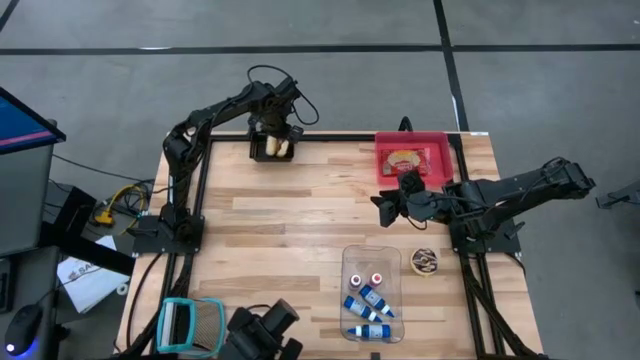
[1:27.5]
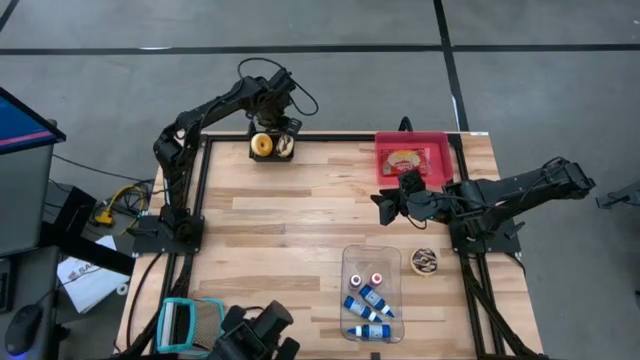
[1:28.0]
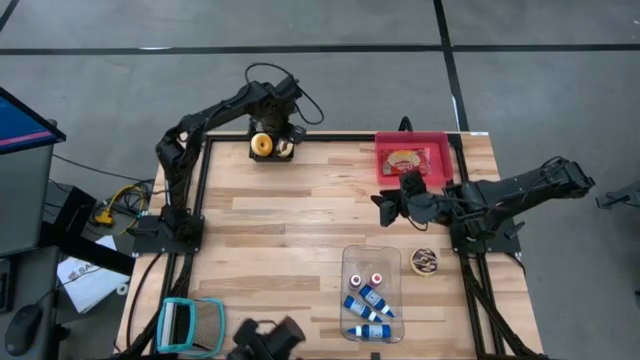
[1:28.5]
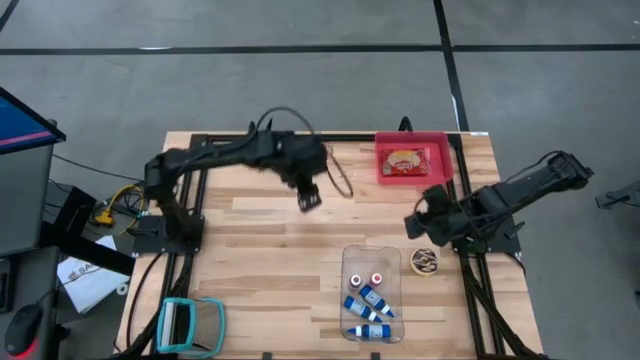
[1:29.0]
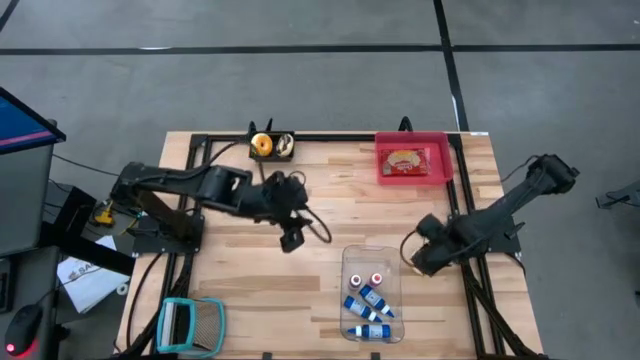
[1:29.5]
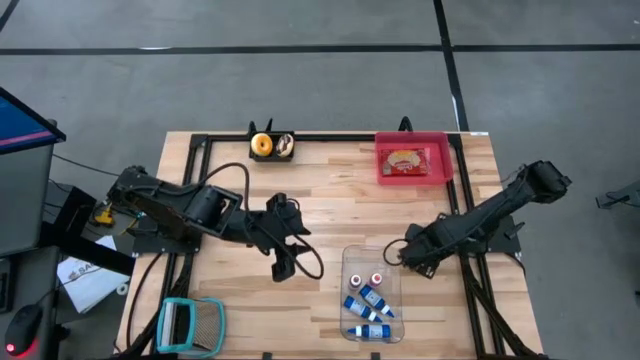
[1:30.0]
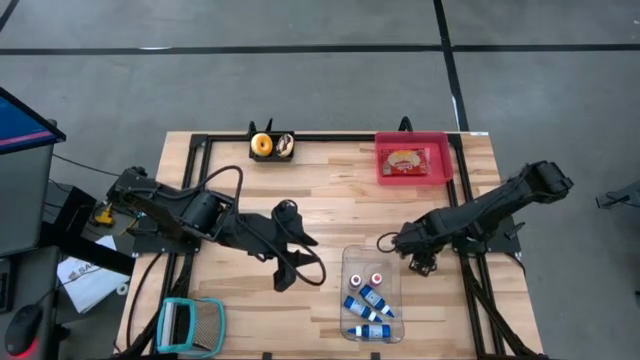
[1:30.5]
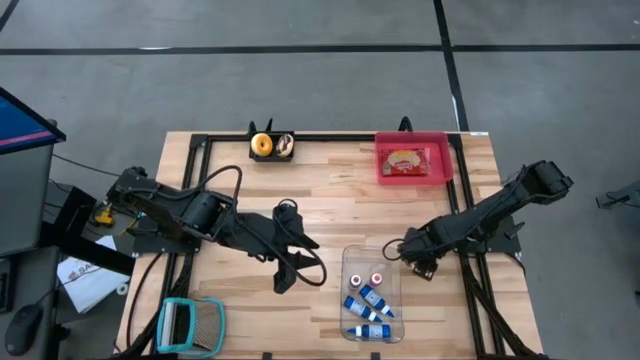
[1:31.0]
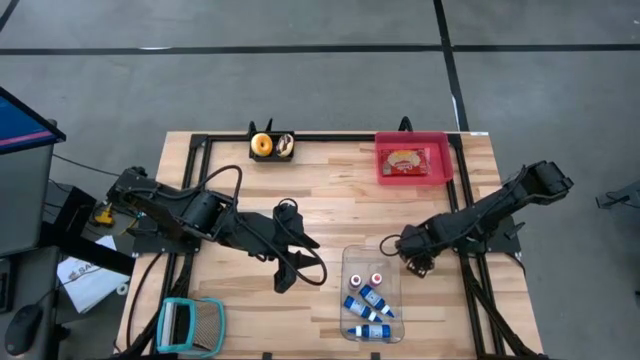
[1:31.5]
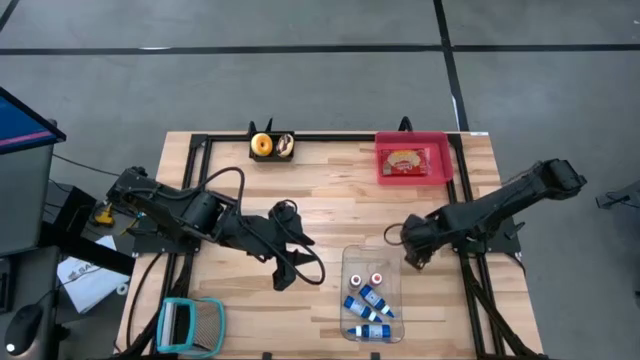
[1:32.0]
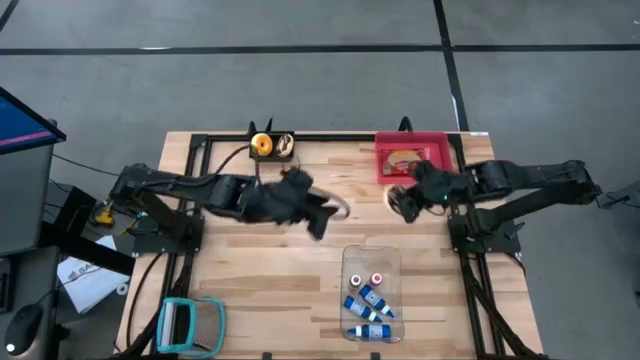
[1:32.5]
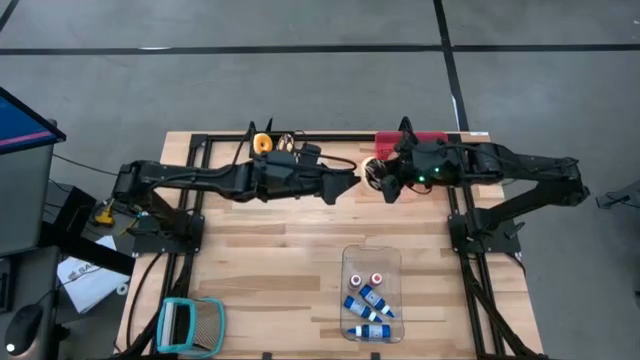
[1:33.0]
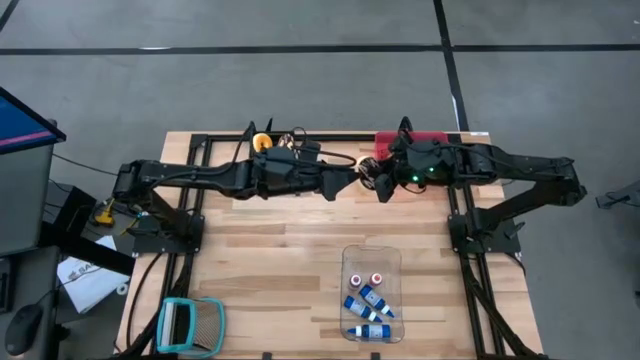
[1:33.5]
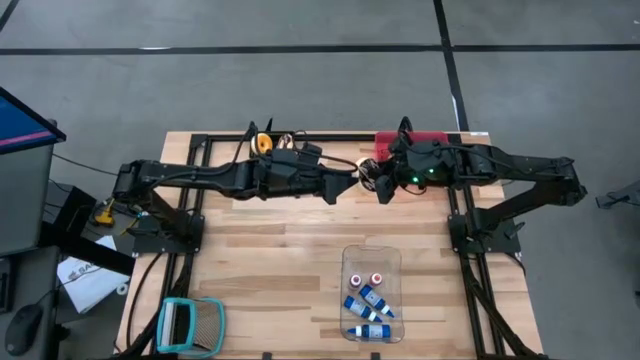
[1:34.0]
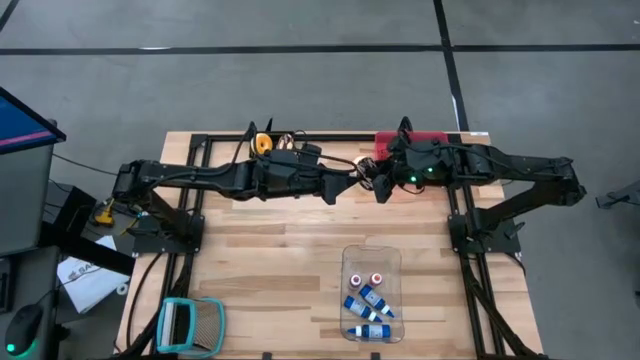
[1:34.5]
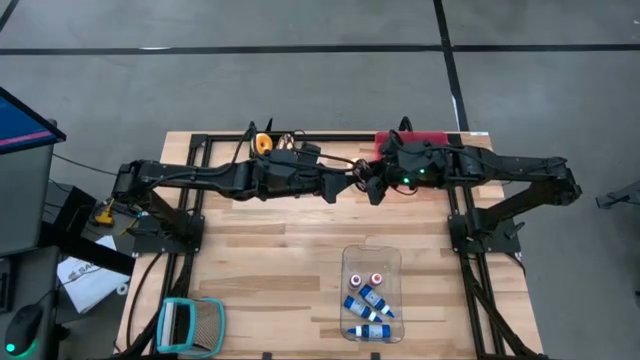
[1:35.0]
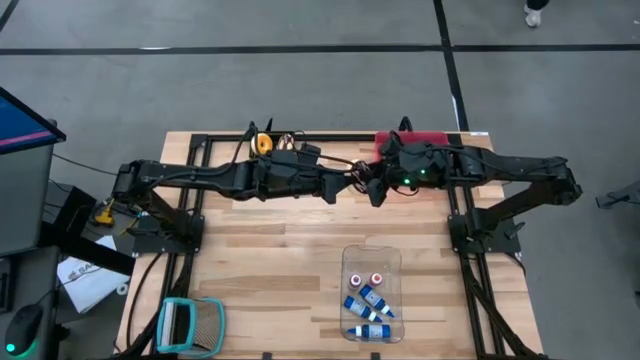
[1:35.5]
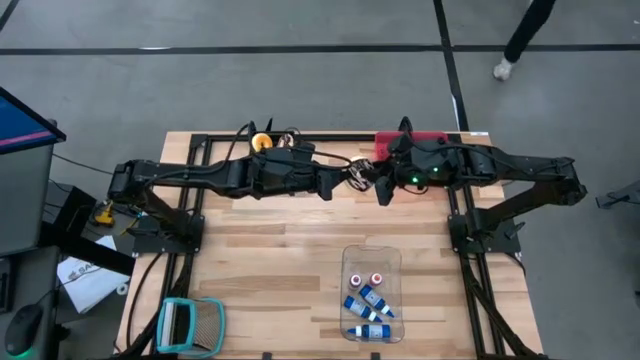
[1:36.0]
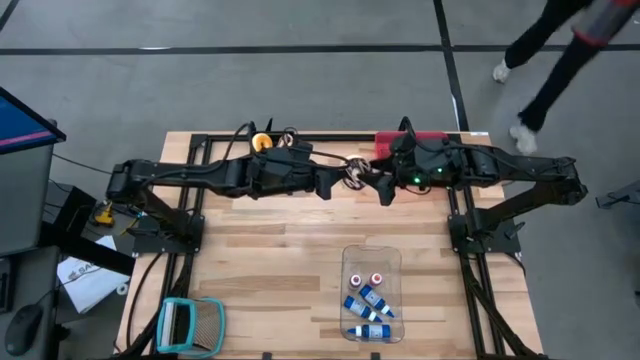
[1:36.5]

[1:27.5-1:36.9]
Put the black donut into the black bin

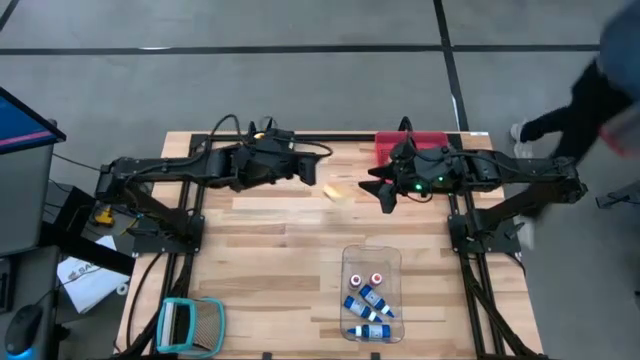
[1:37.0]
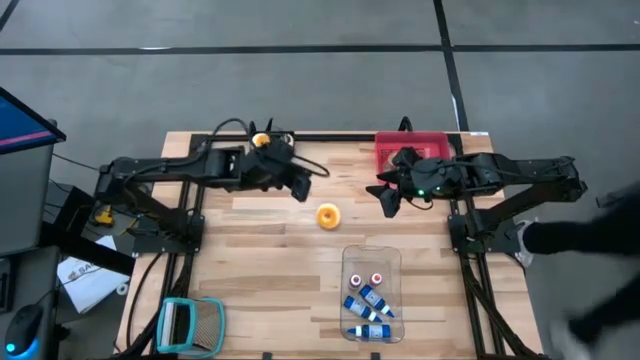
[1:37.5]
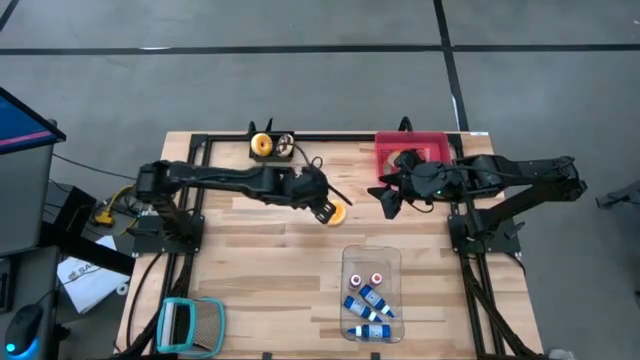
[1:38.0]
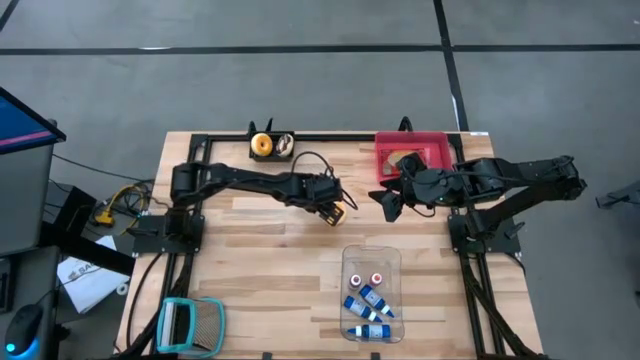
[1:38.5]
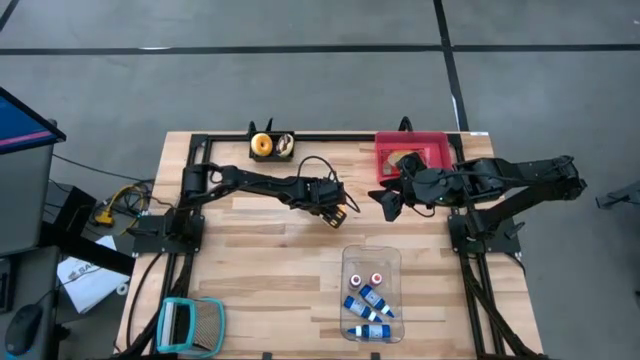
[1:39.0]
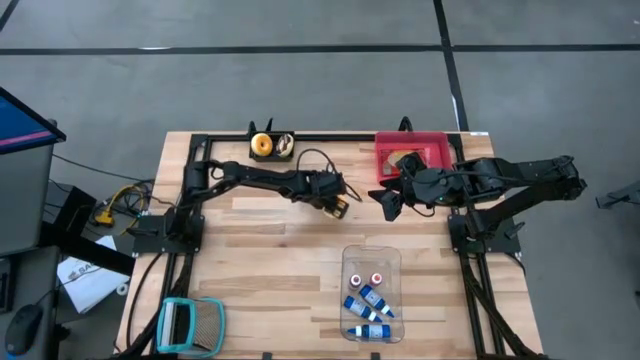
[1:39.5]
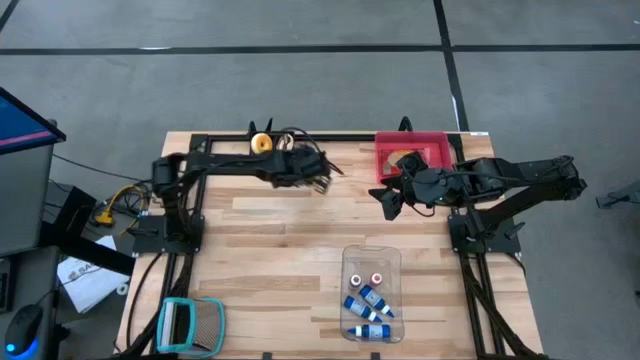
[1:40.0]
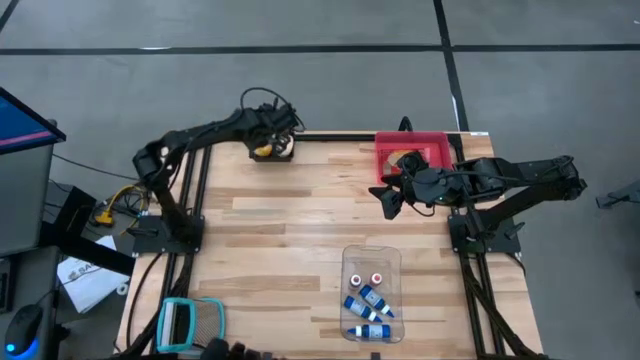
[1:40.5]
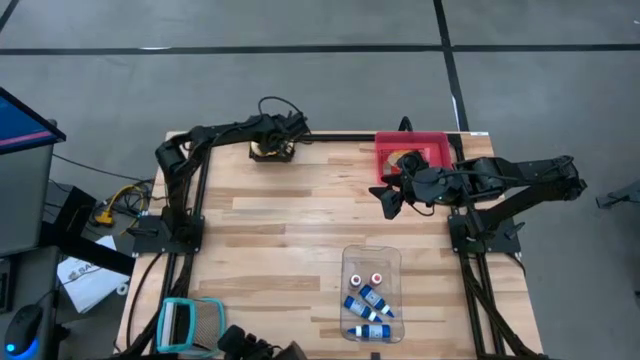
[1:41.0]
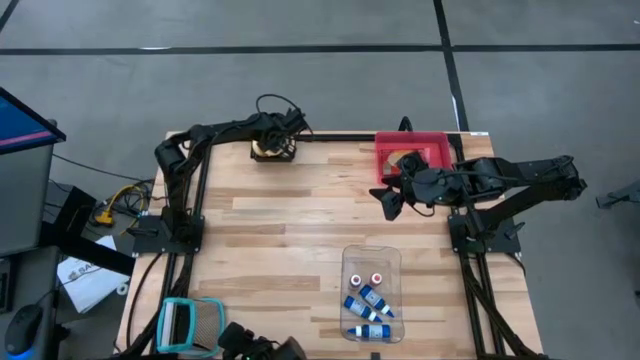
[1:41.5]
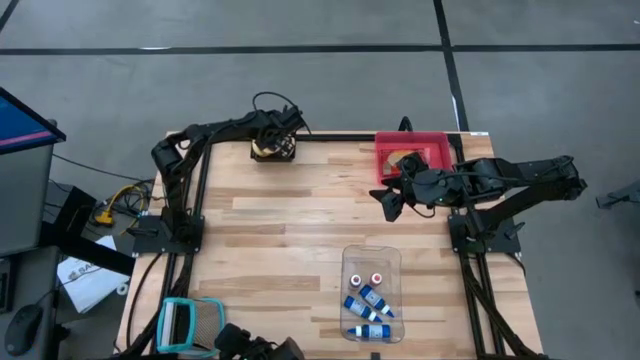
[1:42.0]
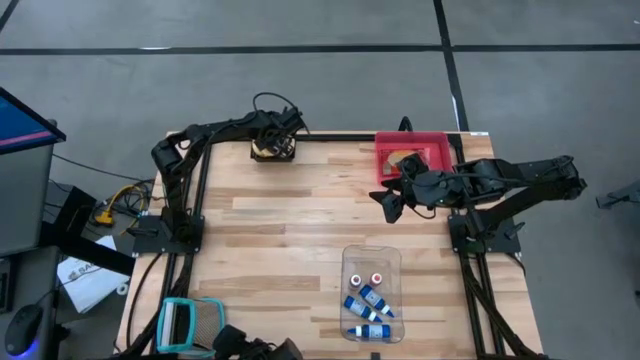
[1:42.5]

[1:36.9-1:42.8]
Put the black donut into the black bin

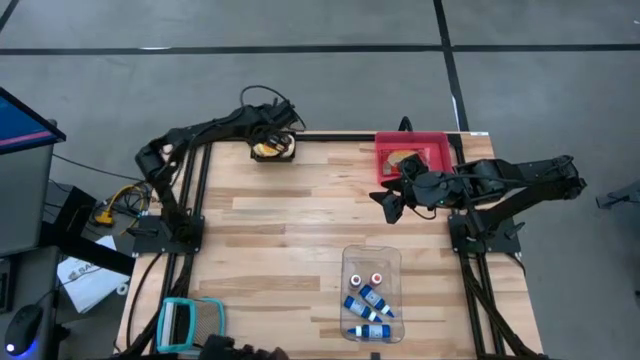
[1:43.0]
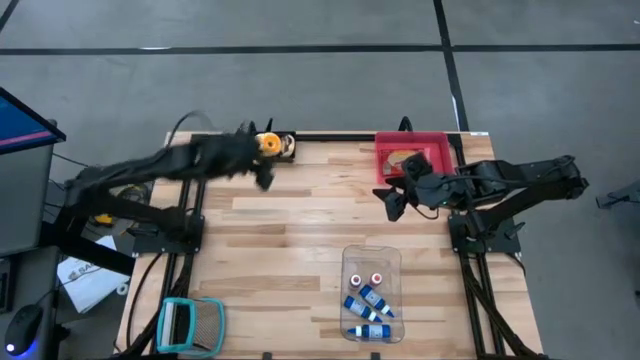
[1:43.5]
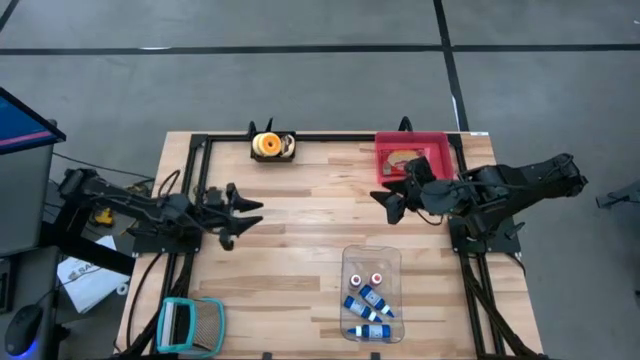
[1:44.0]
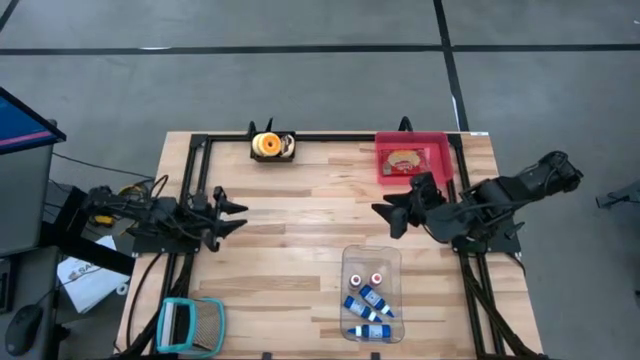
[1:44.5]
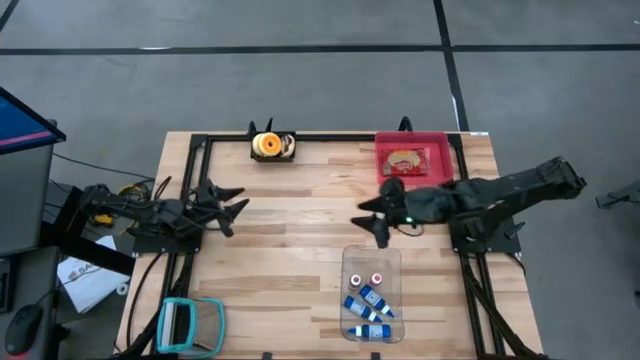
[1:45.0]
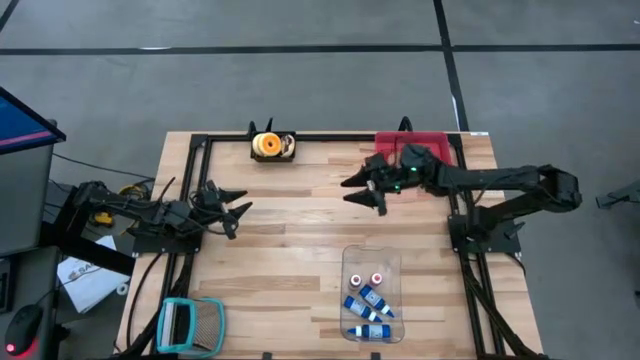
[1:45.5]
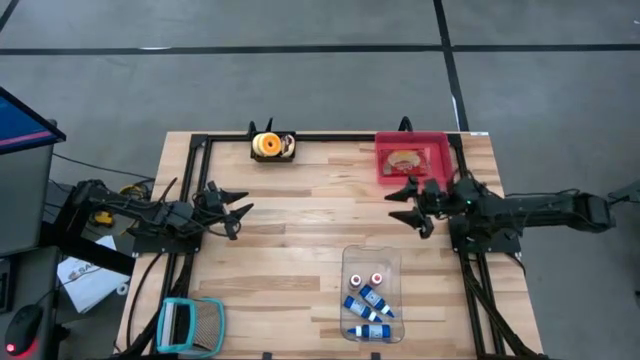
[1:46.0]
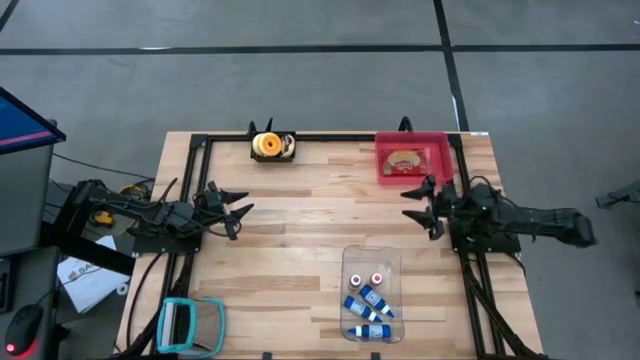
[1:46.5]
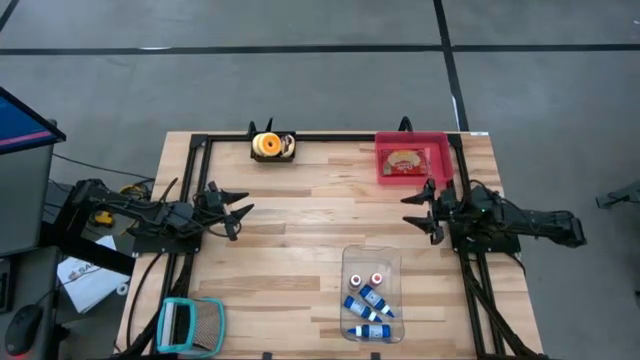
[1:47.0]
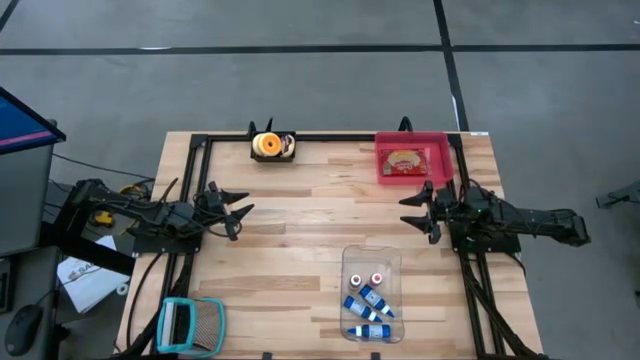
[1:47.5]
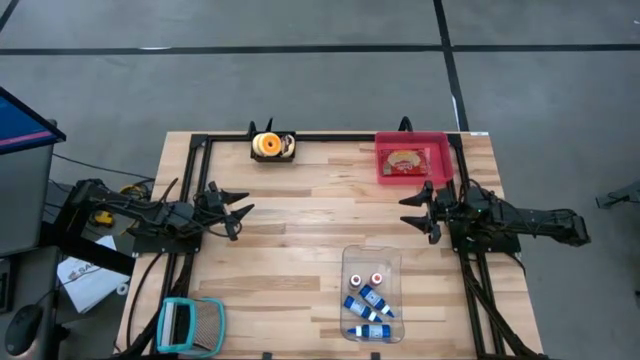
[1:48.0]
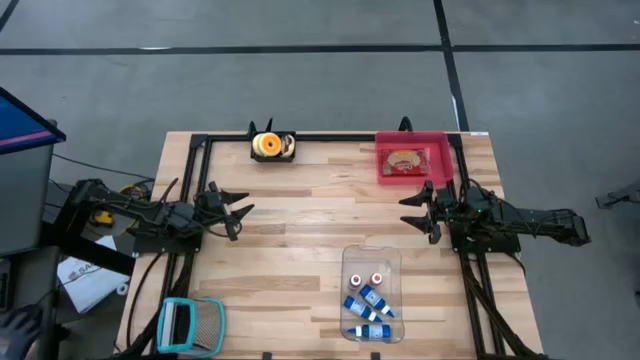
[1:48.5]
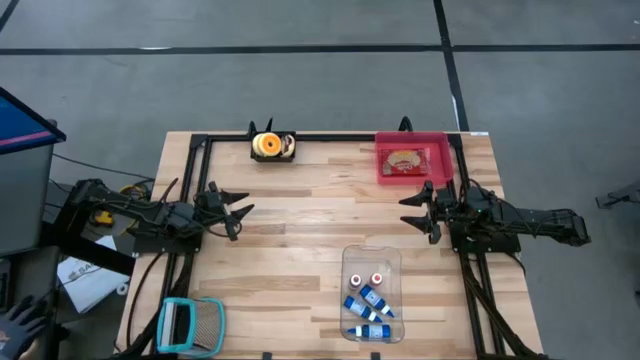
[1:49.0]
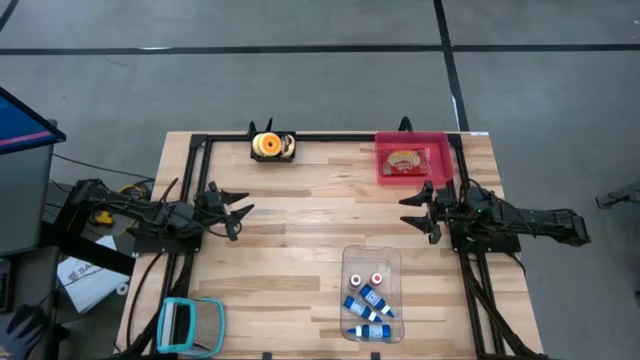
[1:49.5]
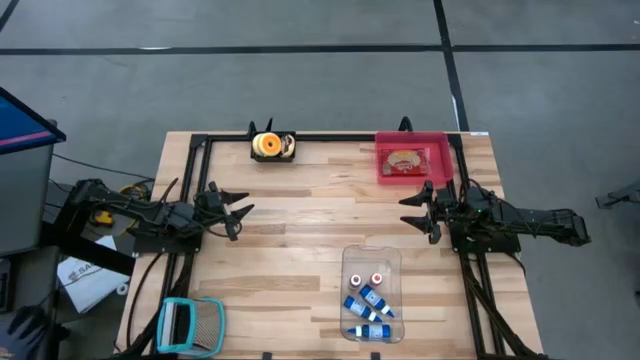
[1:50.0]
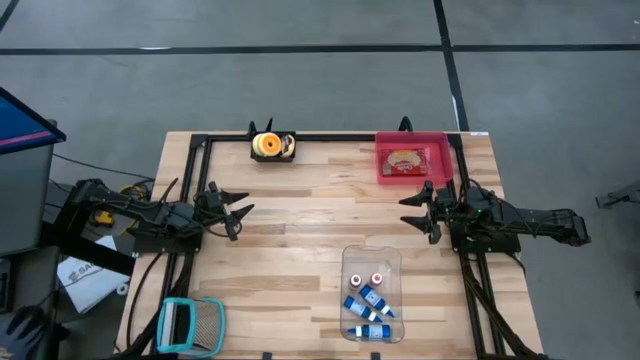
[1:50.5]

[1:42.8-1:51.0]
Return to home position
